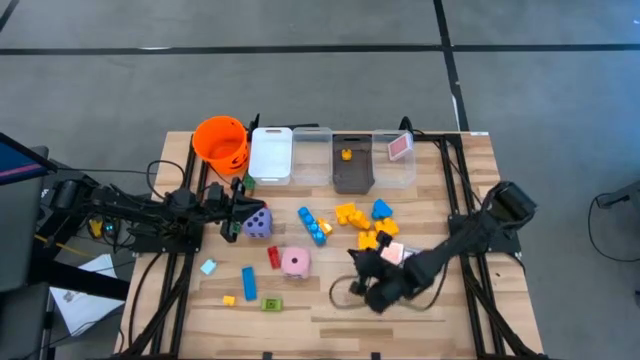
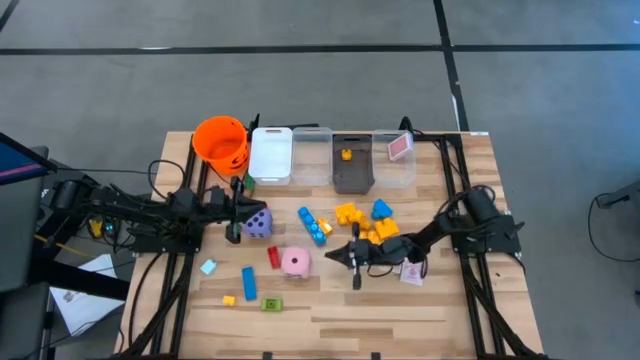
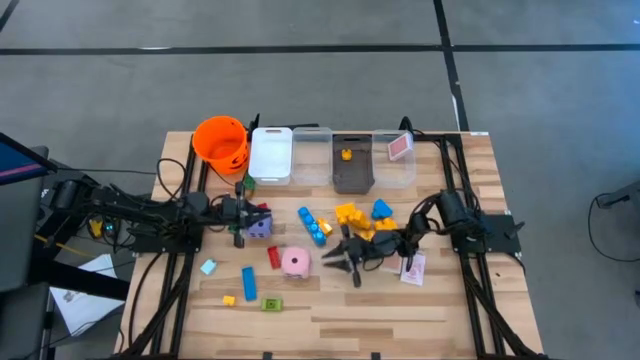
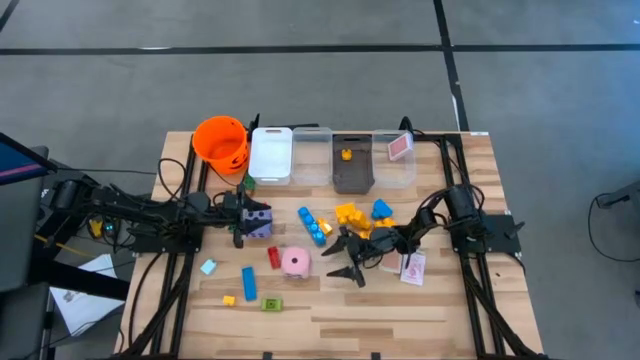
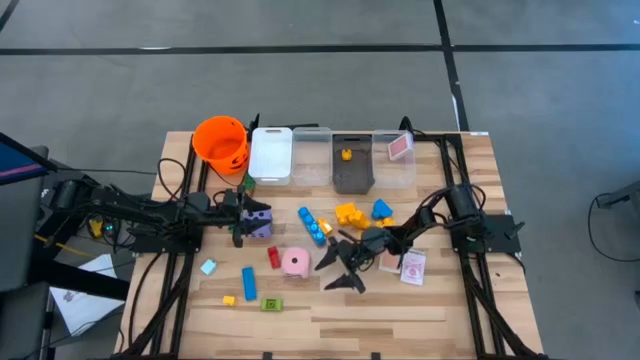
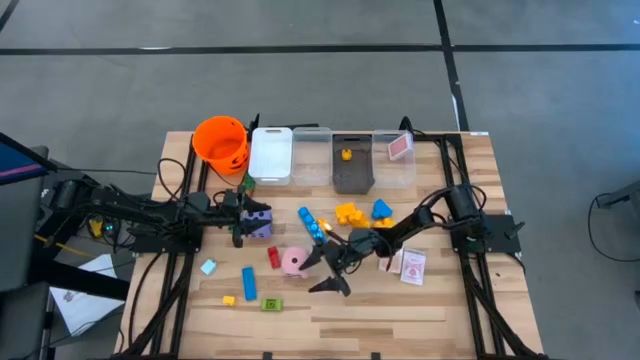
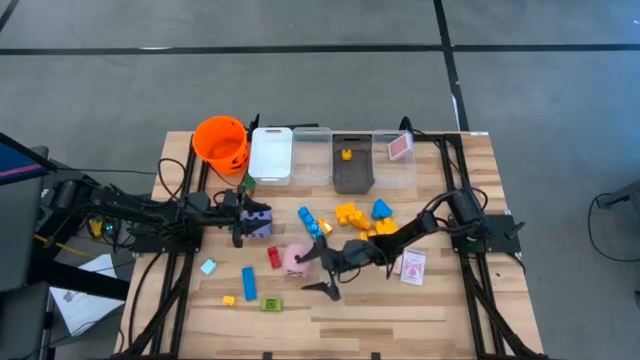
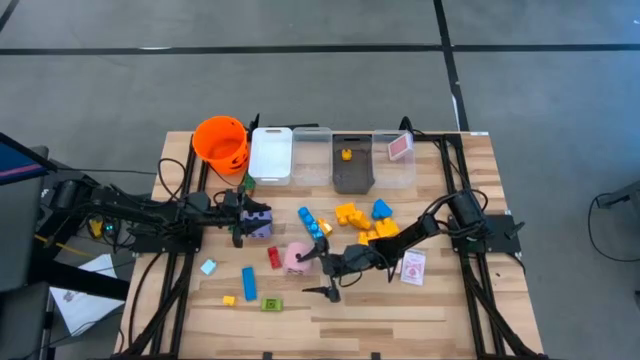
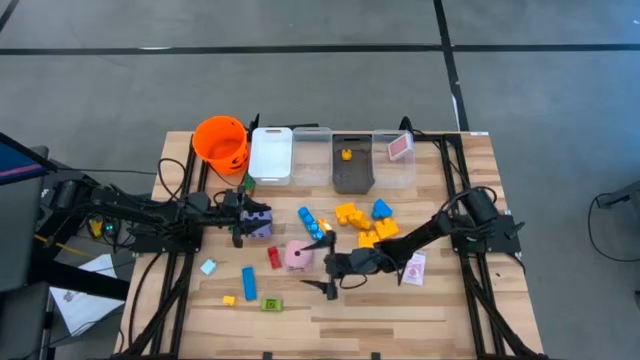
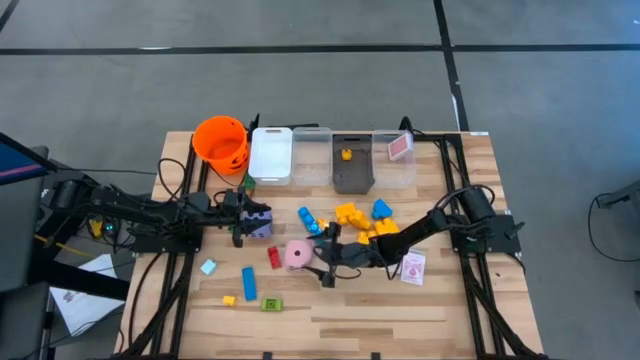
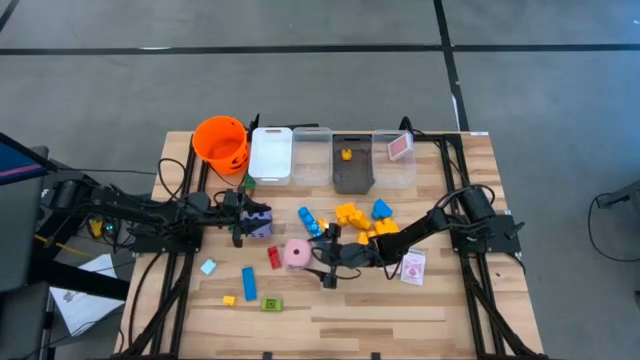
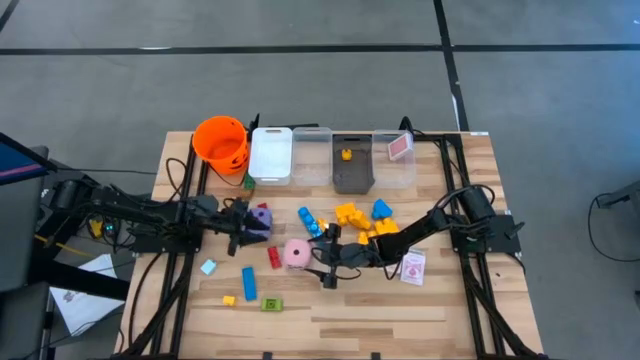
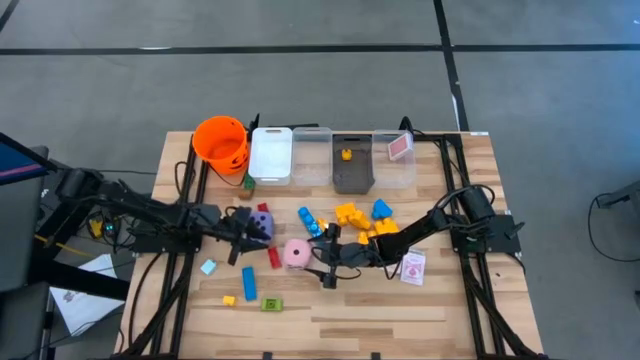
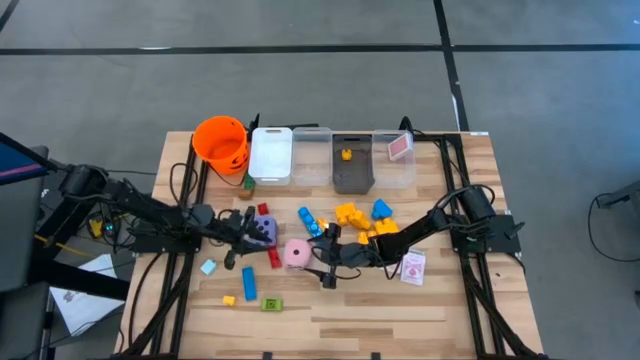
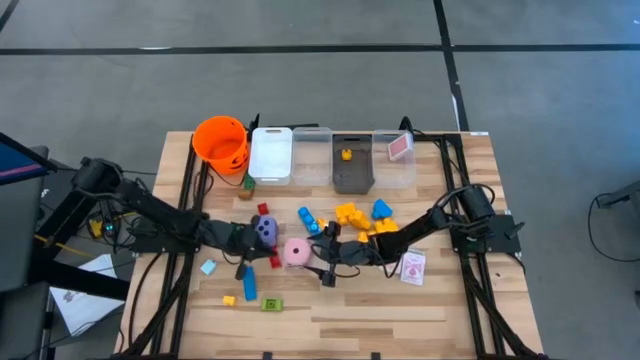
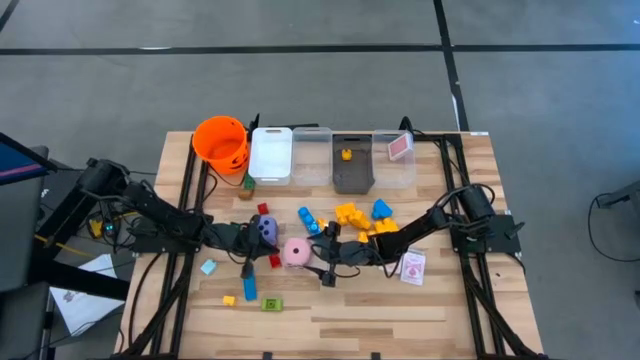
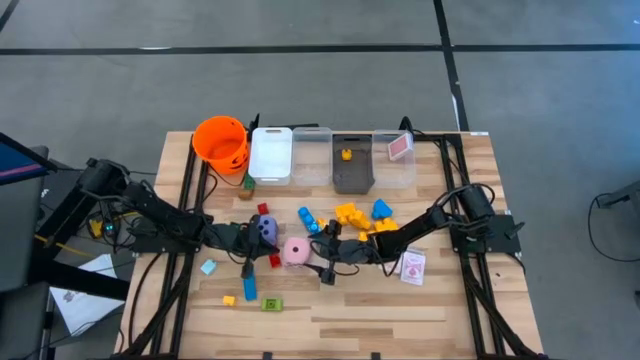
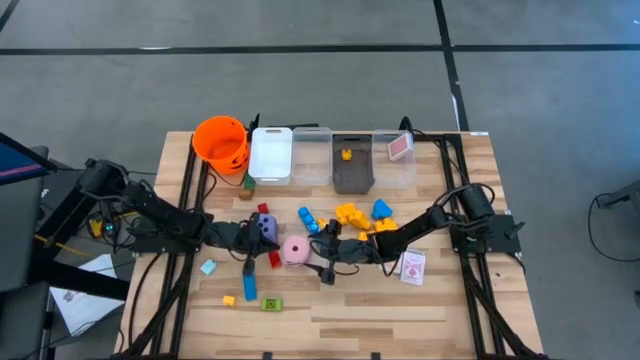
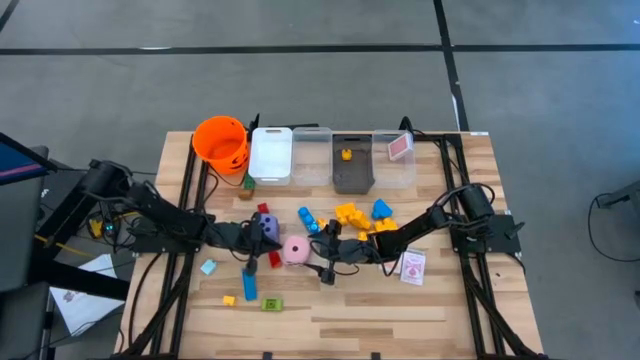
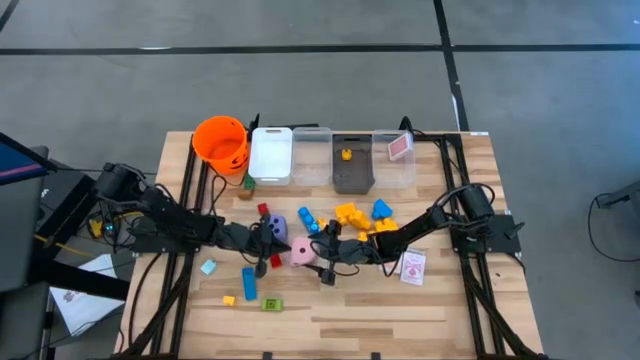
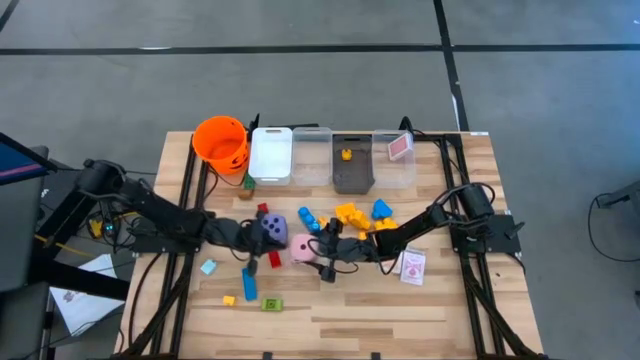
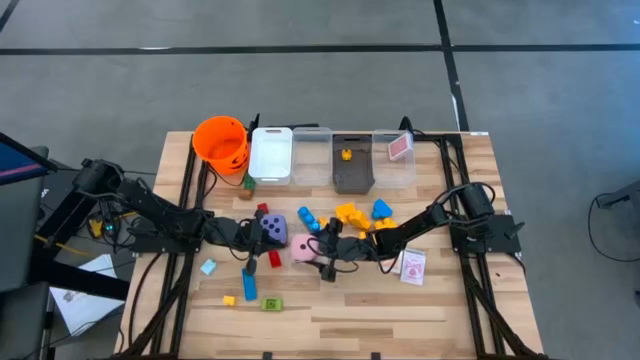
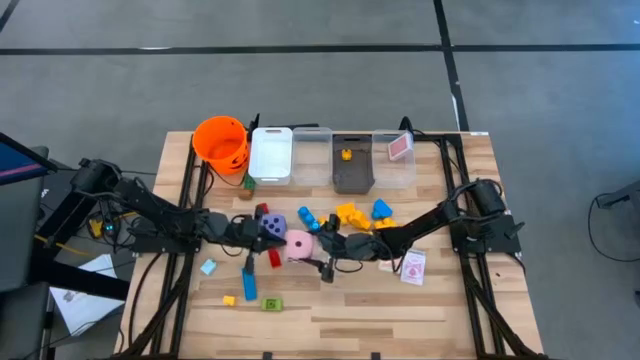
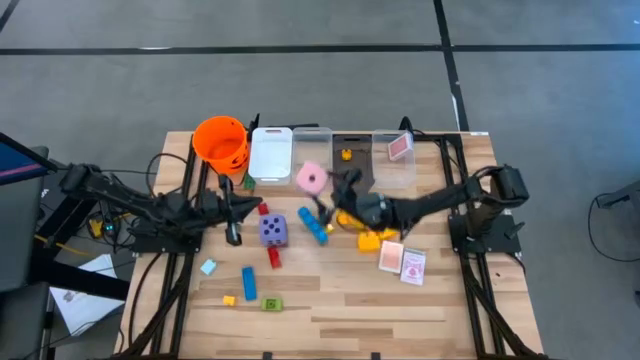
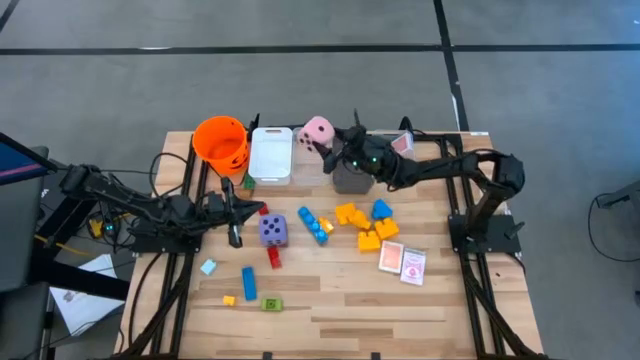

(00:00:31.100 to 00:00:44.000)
Task: Pick & Place Toys
Put the pink die into the left transparent bin

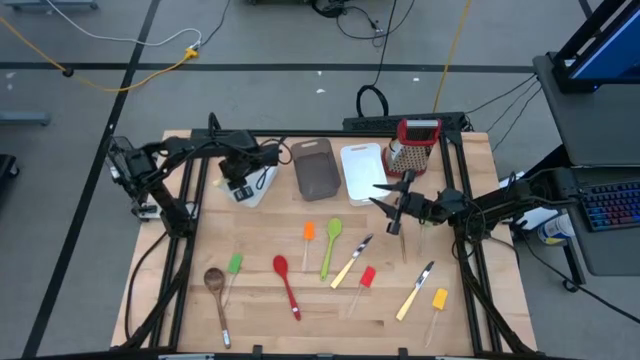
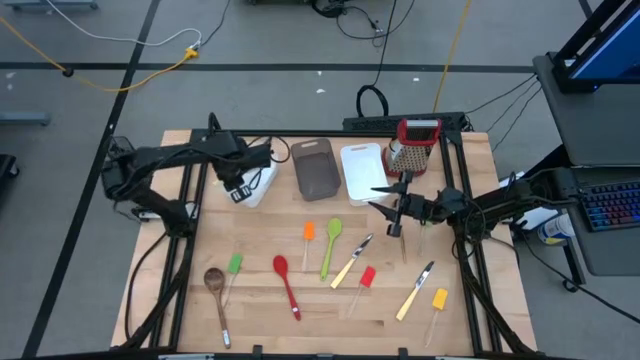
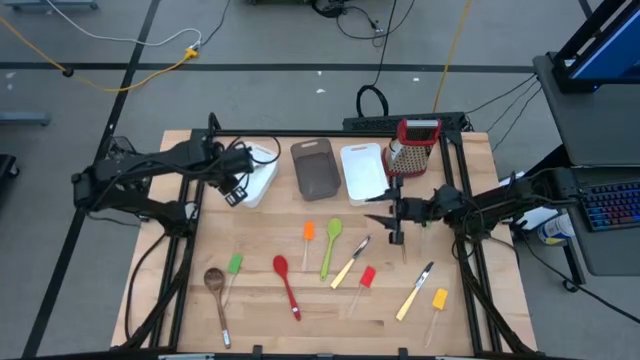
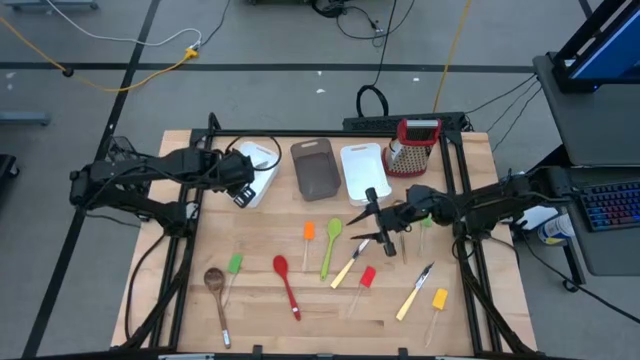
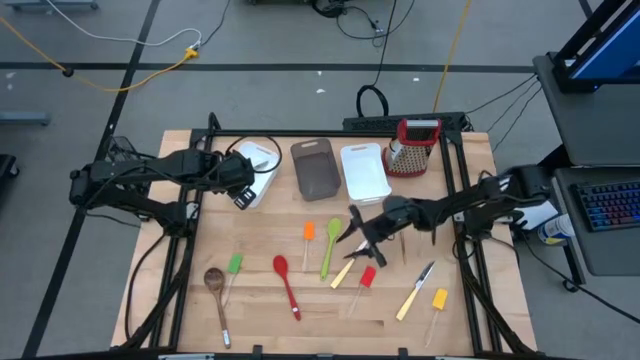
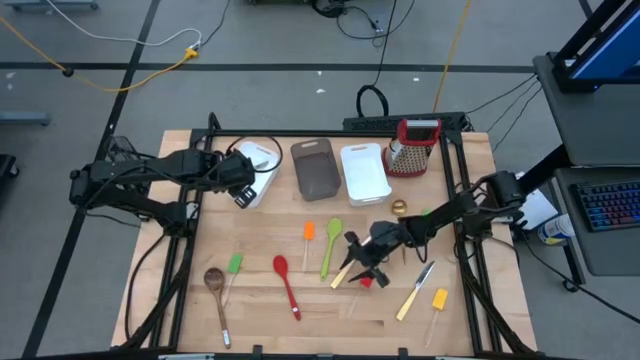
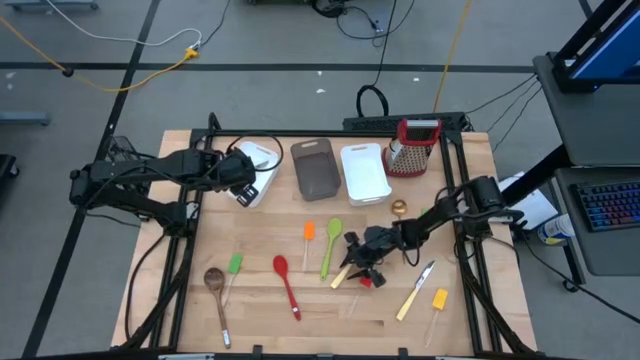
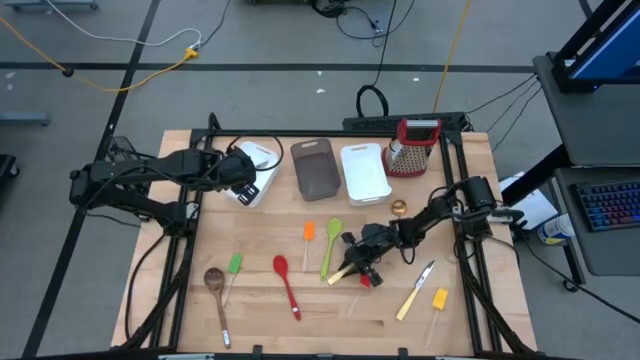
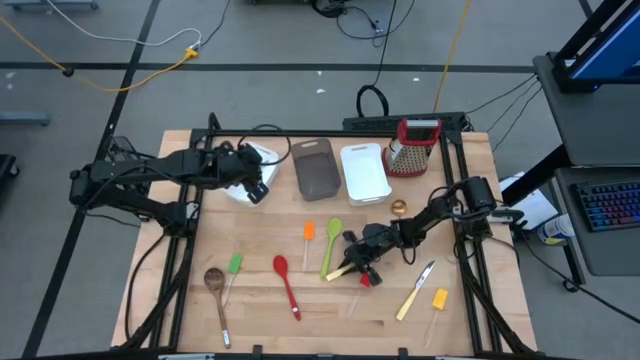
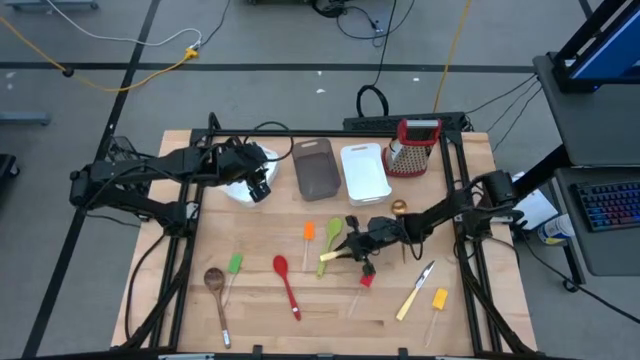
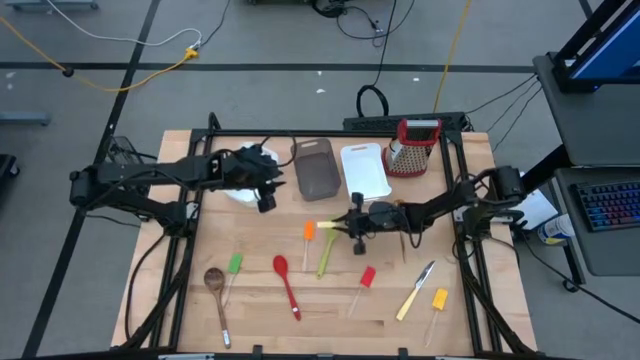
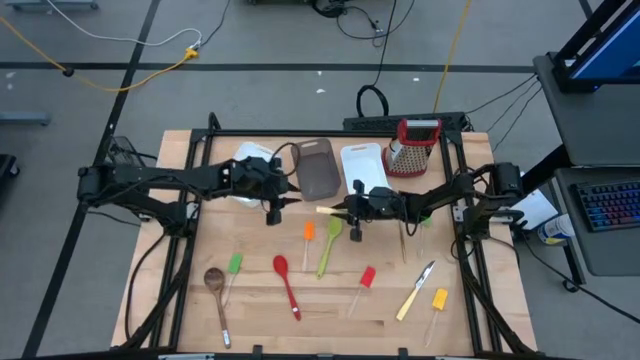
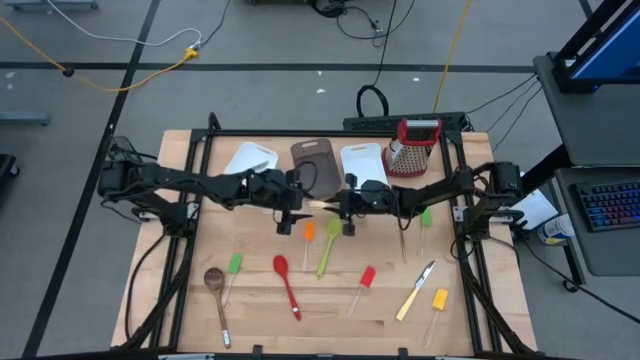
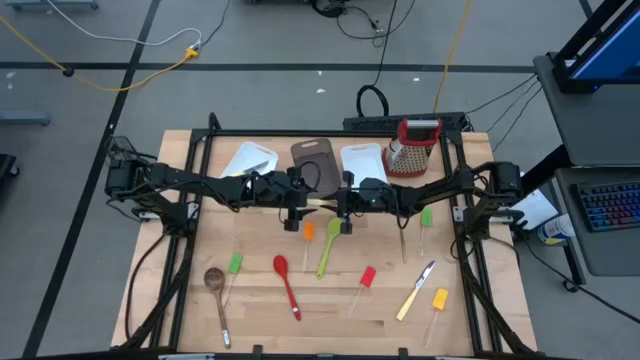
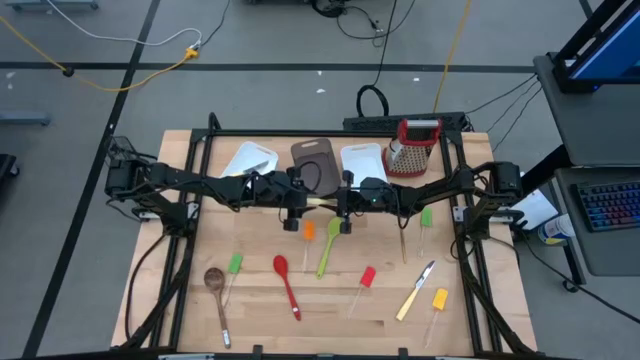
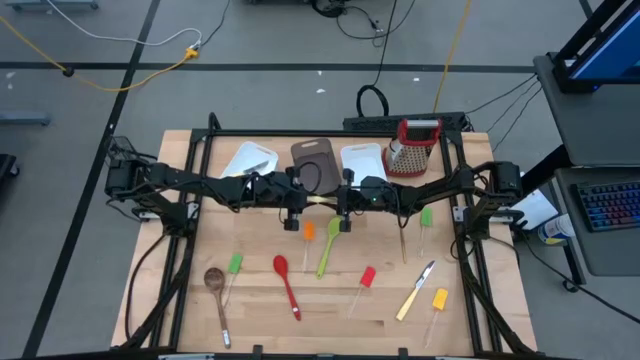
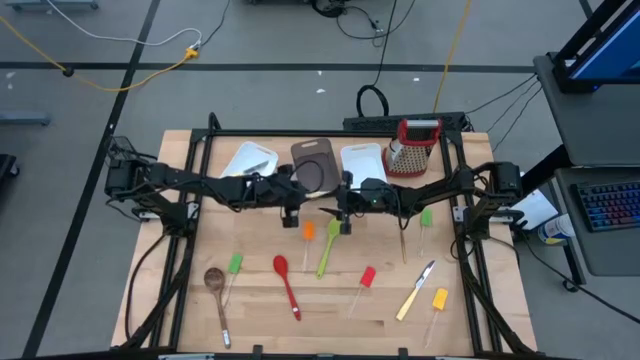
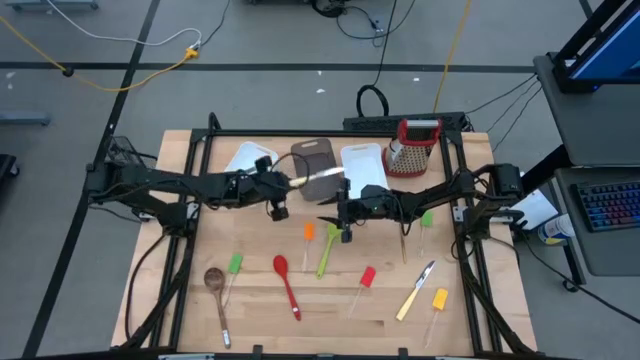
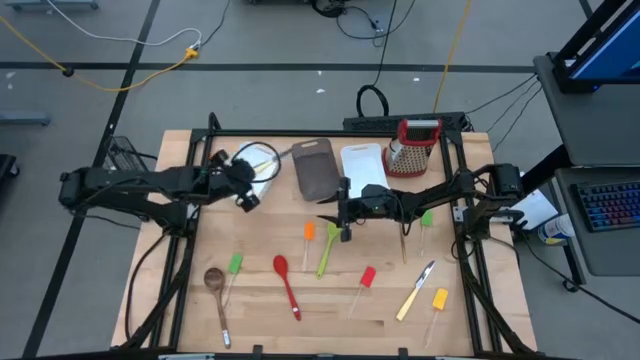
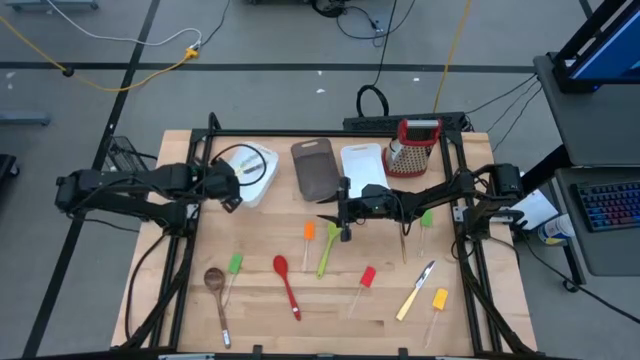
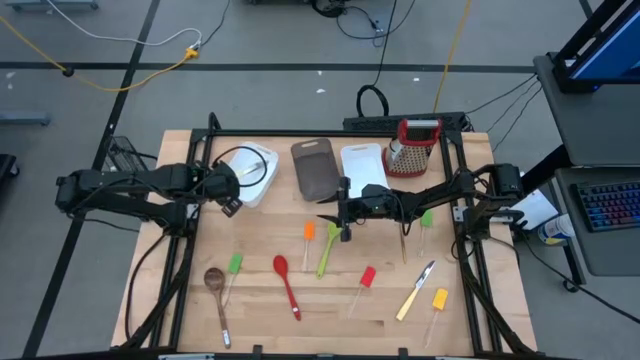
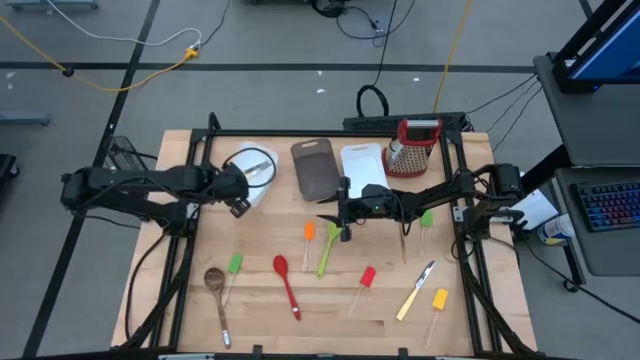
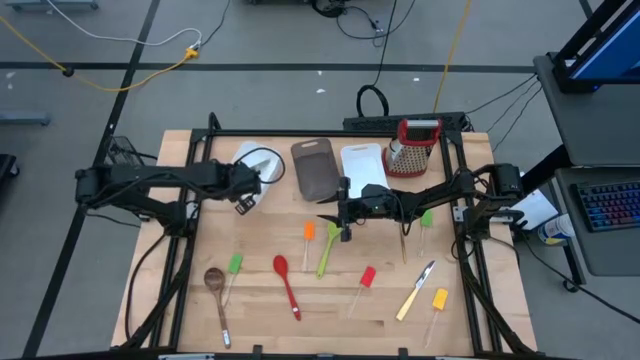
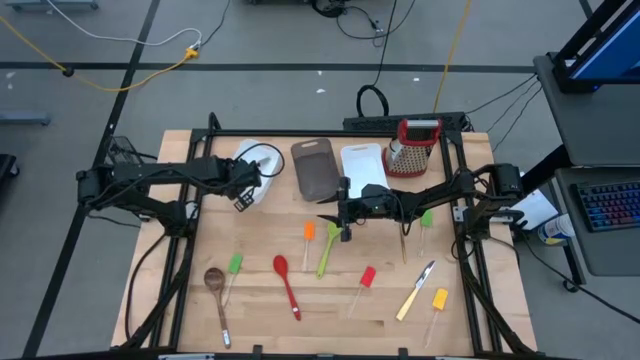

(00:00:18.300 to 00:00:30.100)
Task: Pick & Place Kitchen Items
Put the left yellow knife into the left white bin
